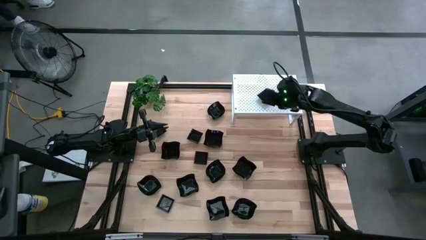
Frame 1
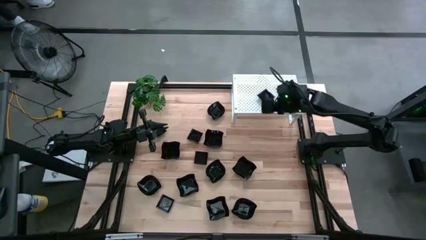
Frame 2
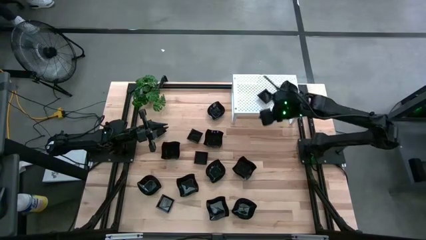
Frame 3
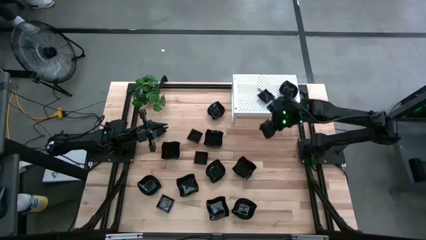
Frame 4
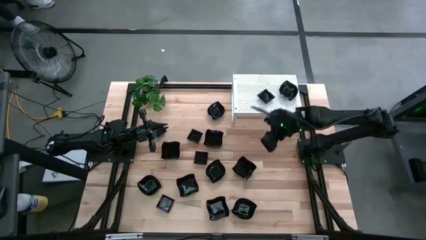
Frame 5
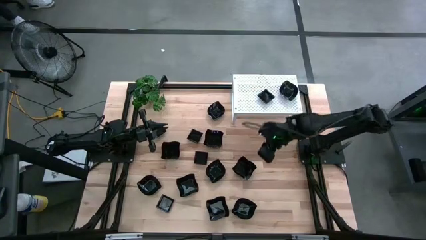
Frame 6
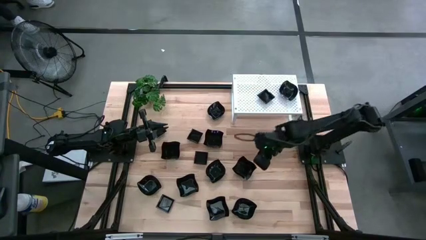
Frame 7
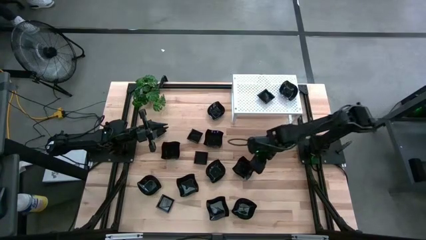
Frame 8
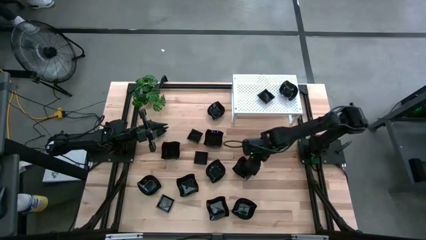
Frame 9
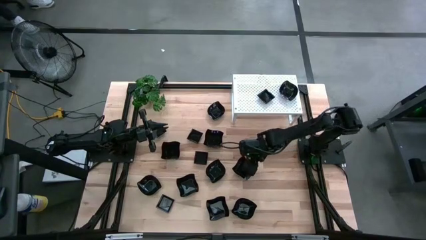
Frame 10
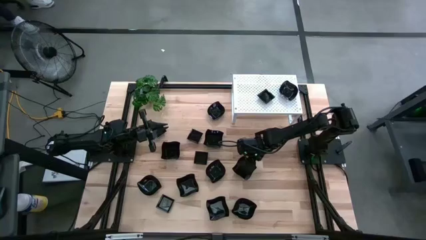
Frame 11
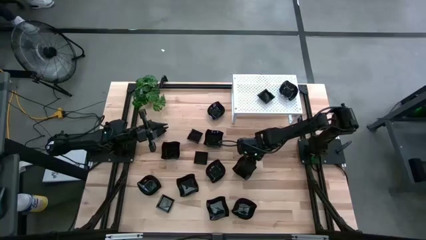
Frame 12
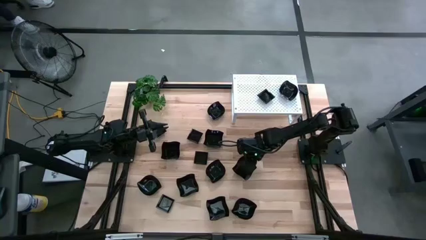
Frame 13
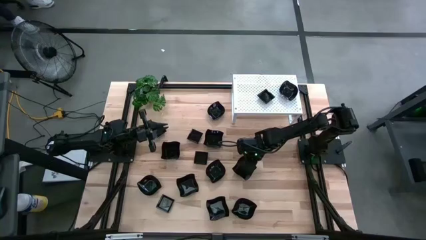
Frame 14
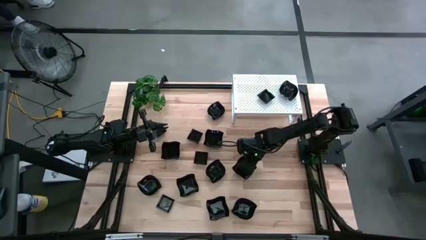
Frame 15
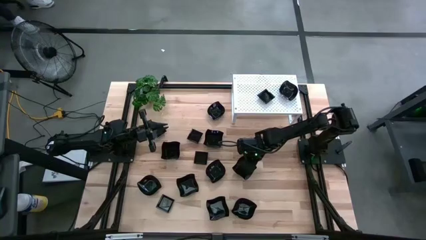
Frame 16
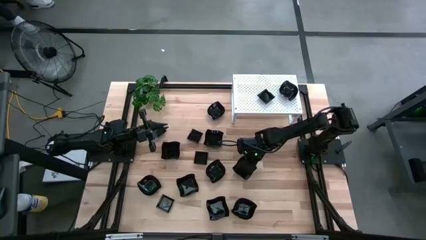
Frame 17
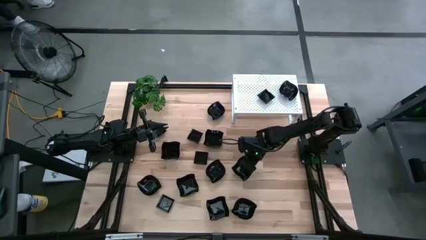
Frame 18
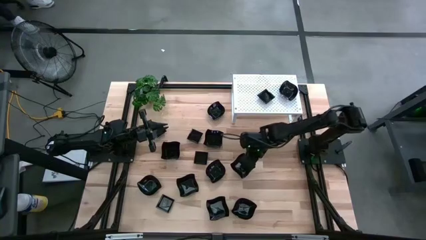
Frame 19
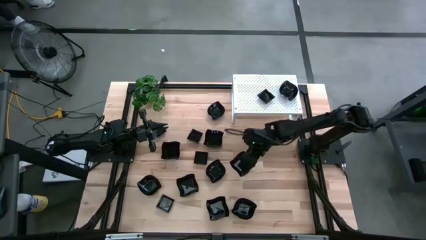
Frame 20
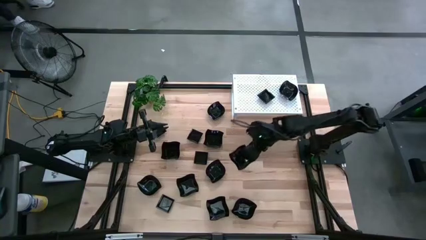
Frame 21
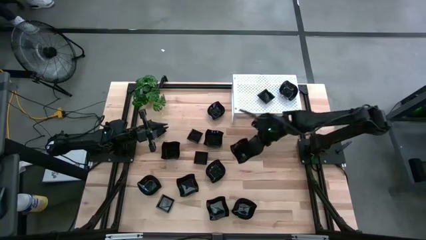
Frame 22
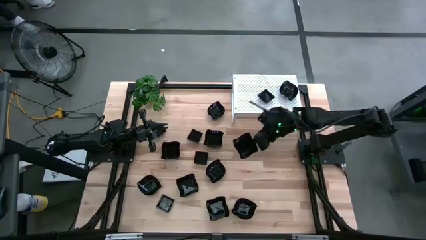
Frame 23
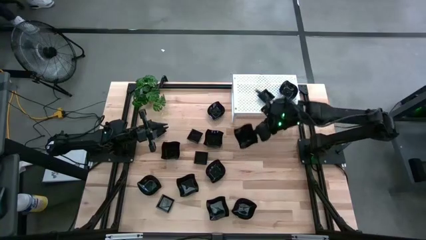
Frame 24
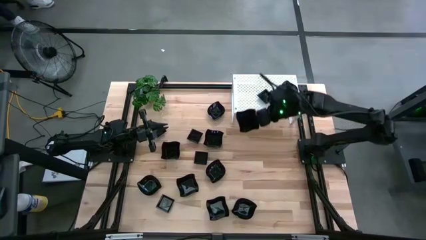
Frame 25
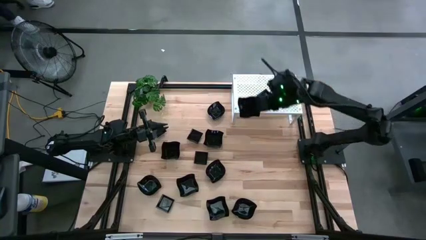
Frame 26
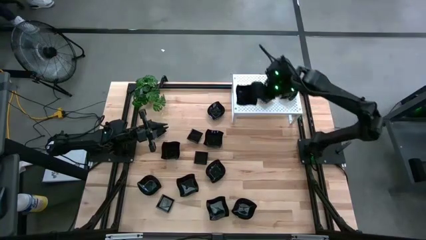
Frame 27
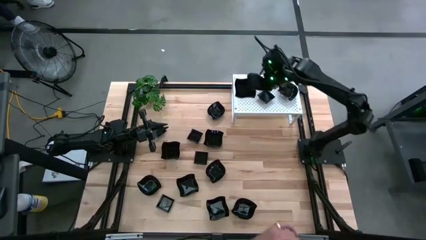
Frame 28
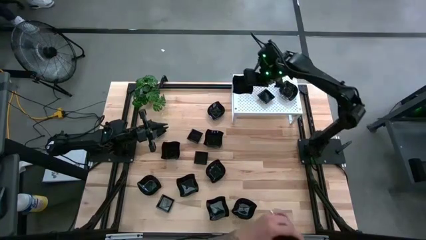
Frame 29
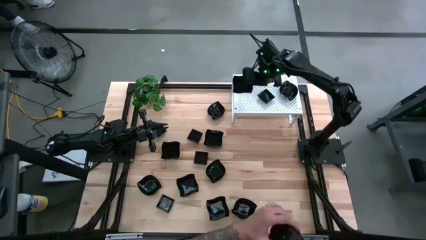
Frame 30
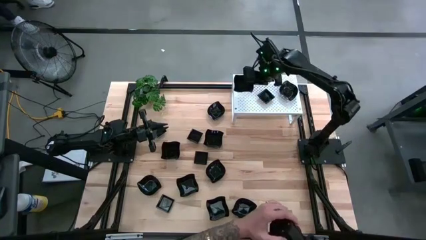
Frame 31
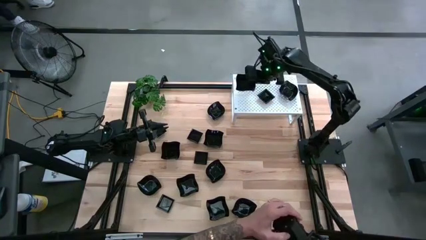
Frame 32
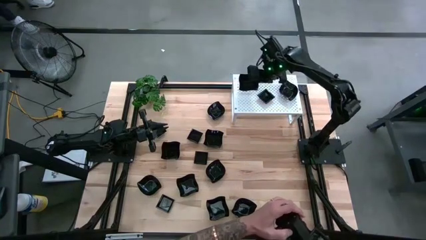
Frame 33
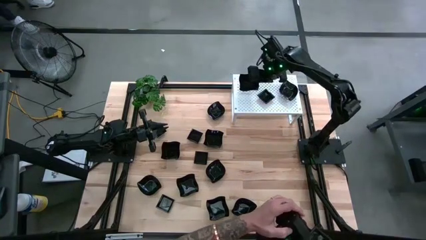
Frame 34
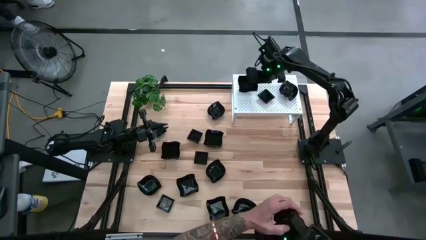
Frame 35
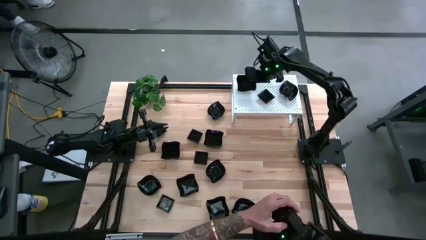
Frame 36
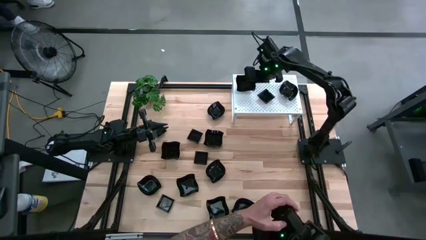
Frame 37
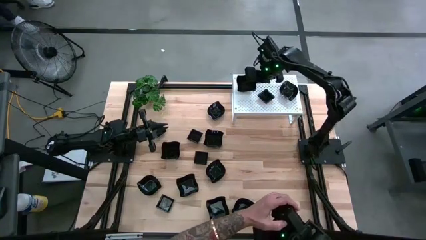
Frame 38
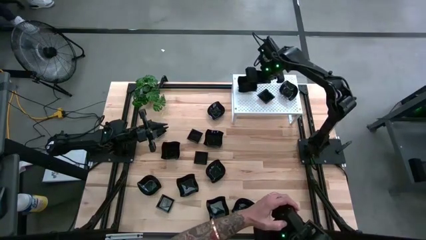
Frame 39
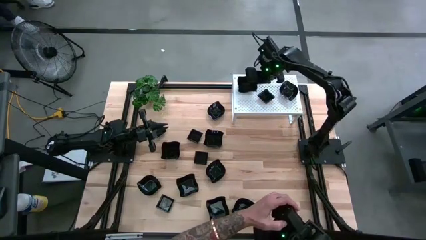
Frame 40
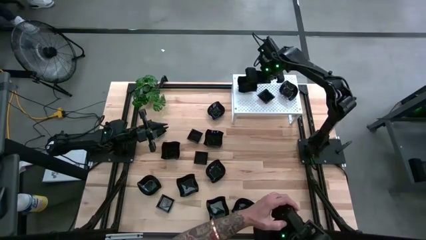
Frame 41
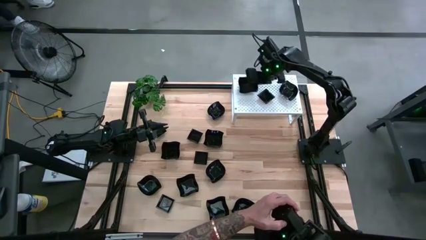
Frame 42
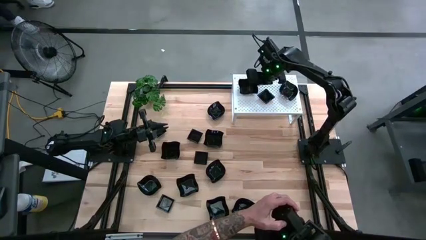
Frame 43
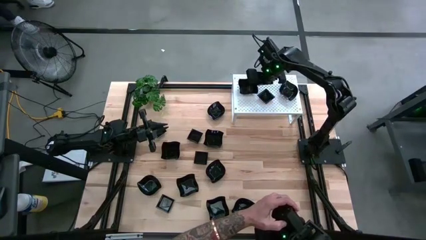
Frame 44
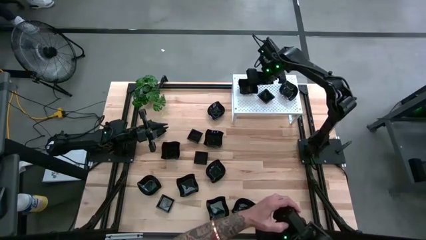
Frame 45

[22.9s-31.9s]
Task: Pick & Place Mini shaped plates
Put the distorted square plate on the shelf

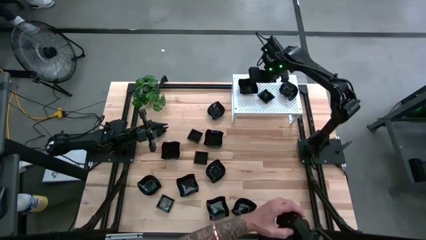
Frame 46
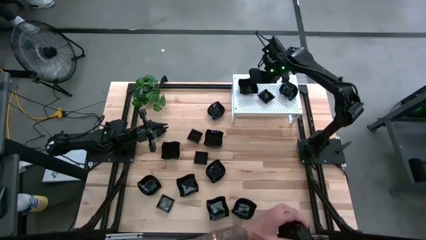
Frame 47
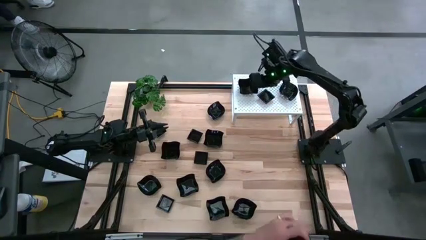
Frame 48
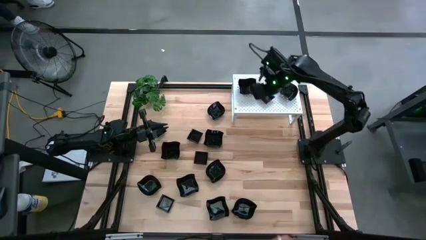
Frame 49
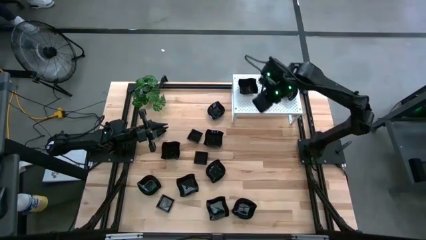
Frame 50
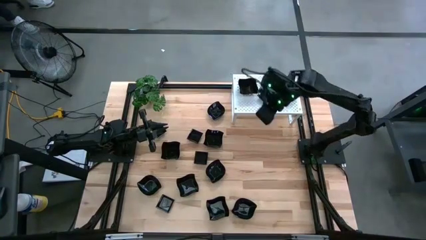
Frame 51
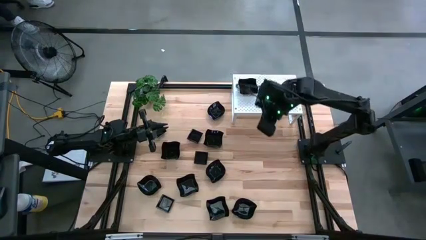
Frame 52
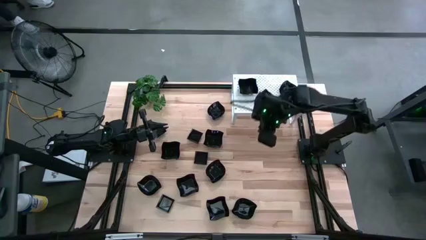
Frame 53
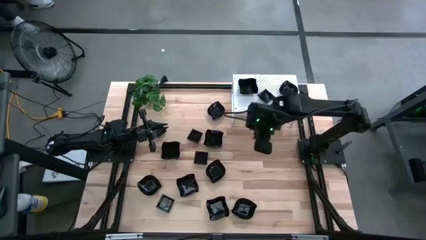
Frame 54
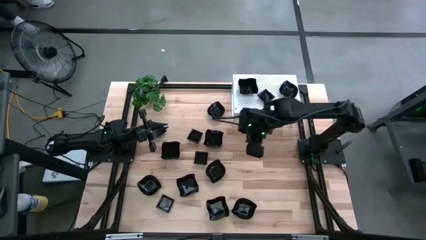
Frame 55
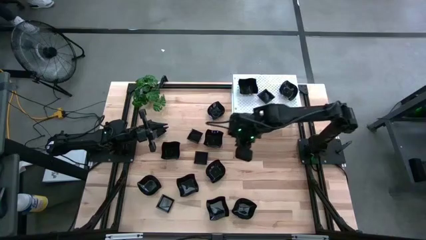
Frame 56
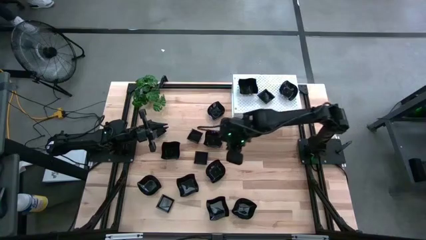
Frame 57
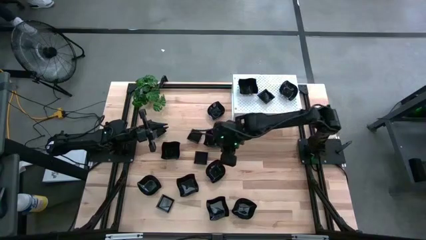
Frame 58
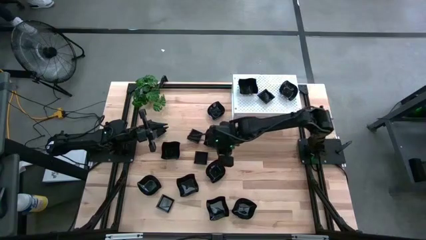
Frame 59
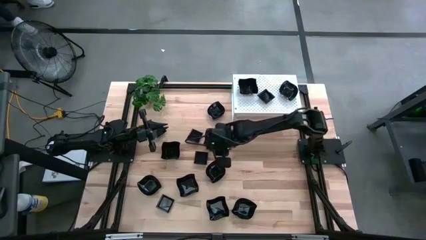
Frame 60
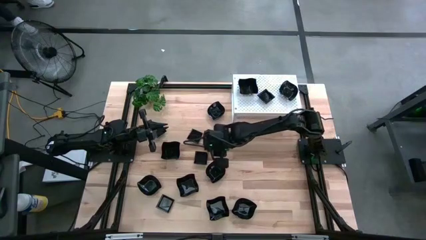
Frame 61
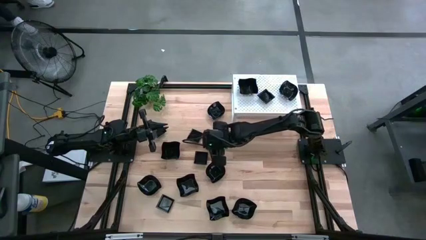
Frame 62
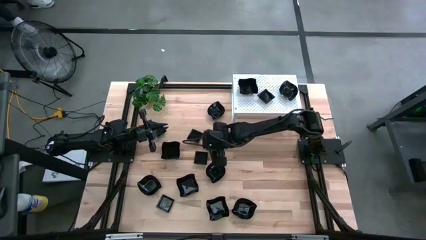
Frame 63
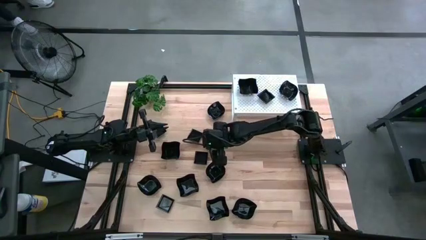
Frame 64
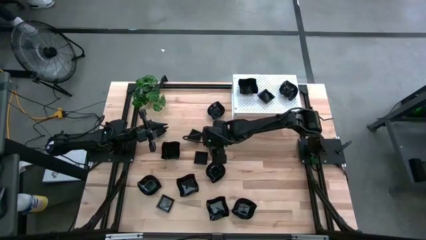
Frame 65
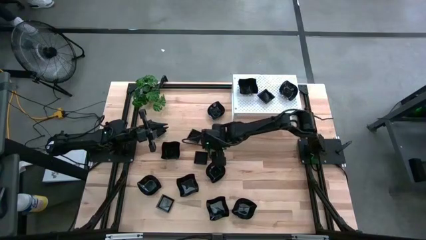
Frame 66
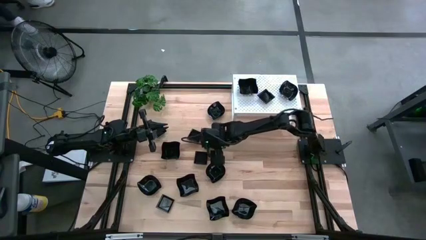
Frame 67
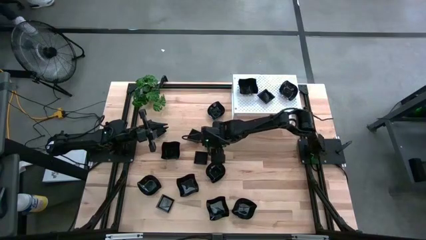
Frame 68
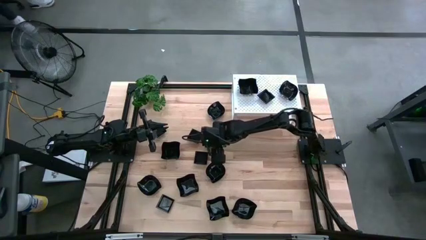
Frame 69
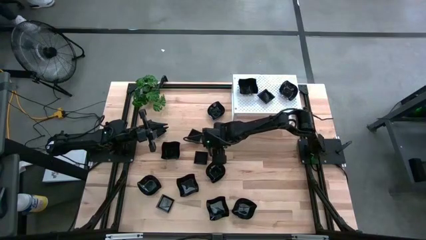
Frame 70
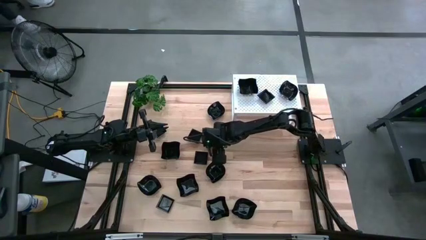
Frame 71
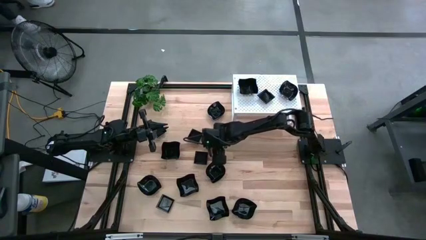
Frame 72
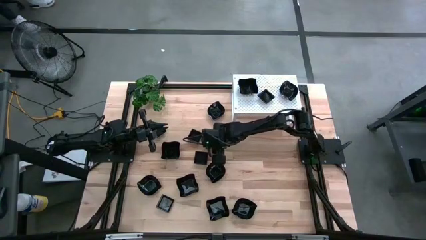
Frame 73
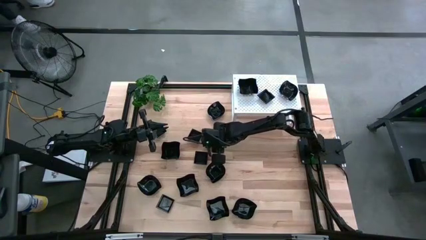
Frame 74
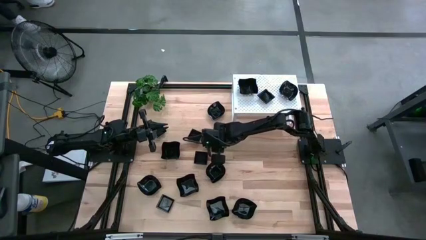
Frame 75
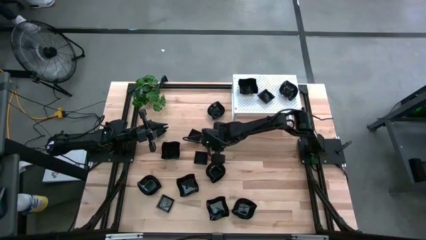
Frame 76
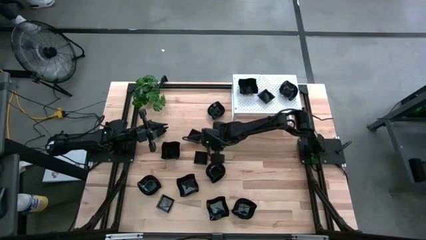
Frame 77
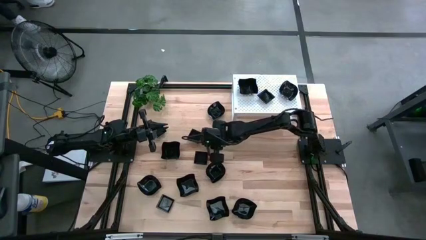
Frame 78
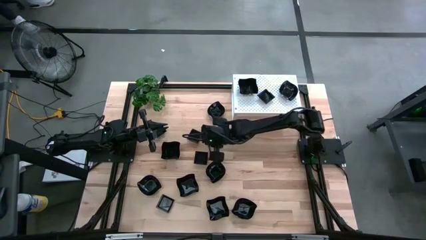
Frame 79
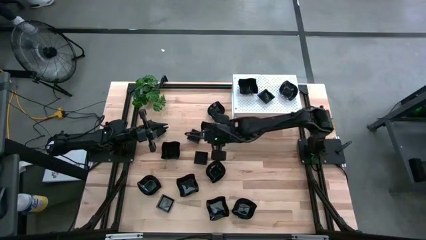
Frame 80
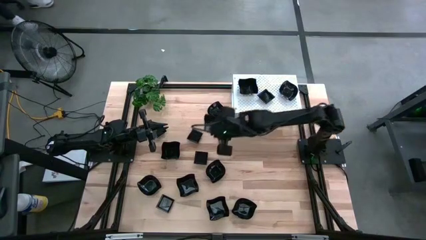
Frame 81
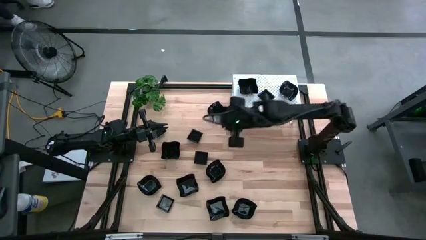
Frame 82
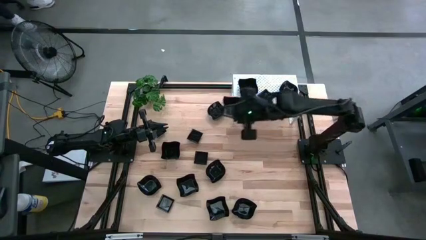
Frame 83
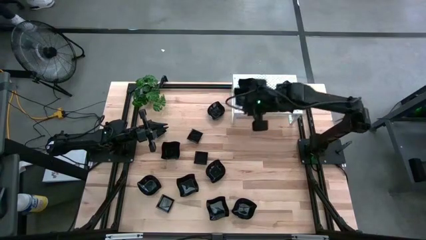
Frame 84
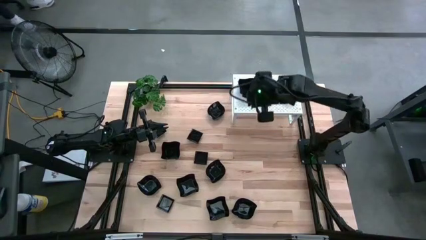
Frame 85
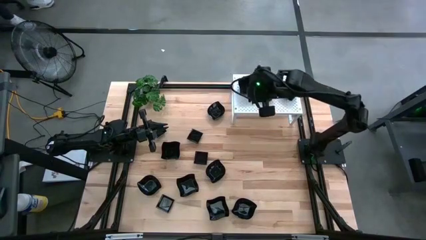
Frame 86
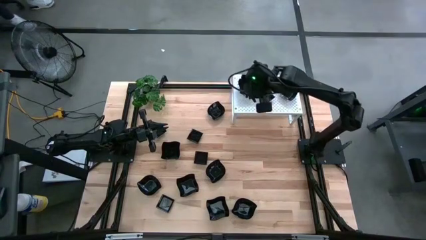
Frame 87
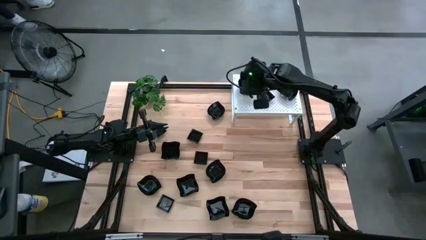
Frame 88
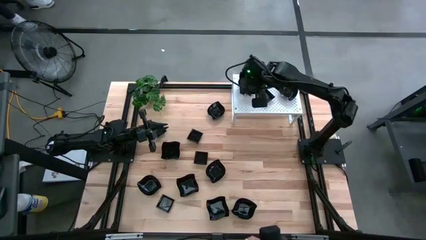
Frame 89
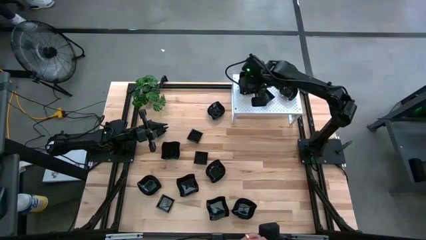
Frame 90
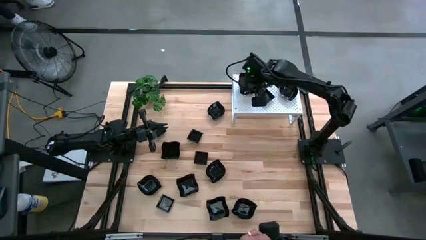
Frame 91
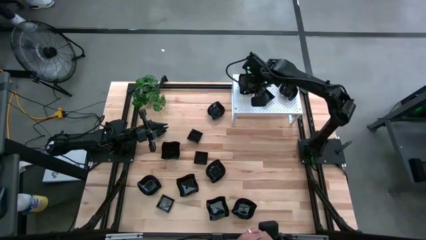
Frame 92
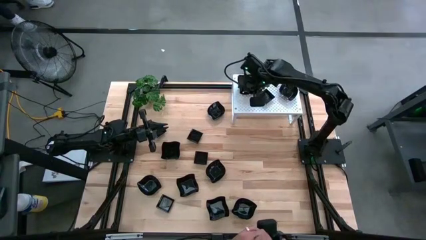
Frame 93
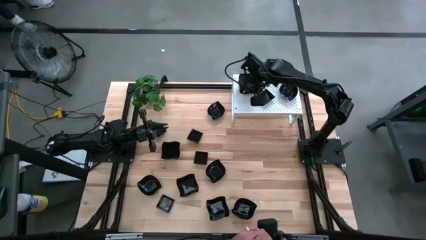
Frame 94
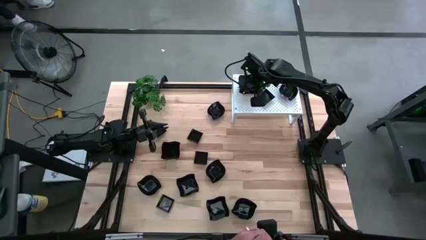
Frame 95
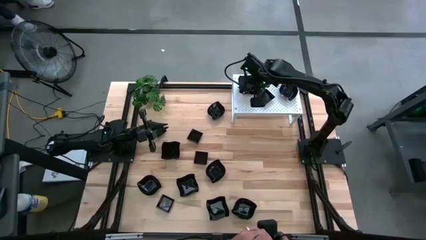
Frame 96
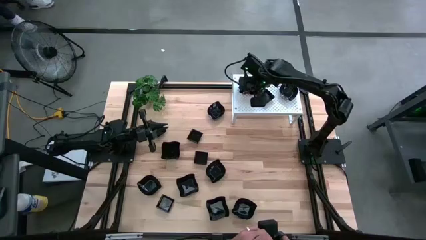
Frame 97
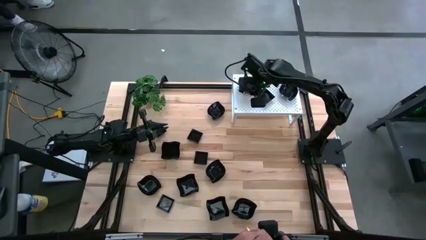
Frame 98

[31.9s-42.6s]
Stack the distorted square plate on top of the distorted square plate on the shelf
